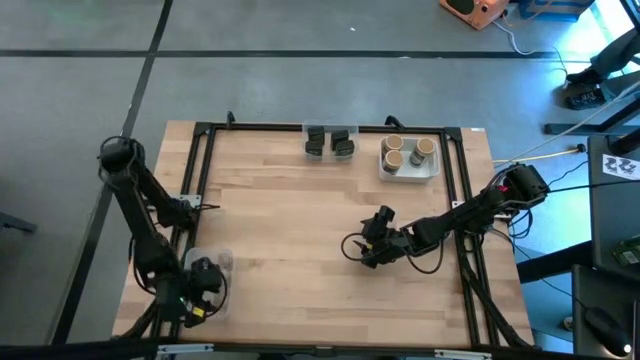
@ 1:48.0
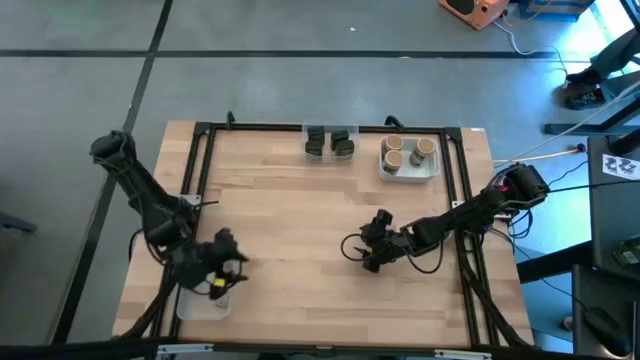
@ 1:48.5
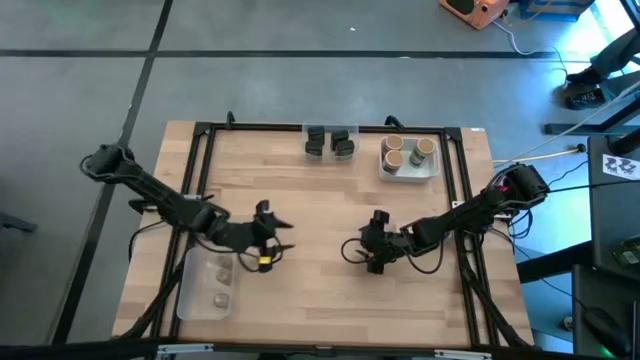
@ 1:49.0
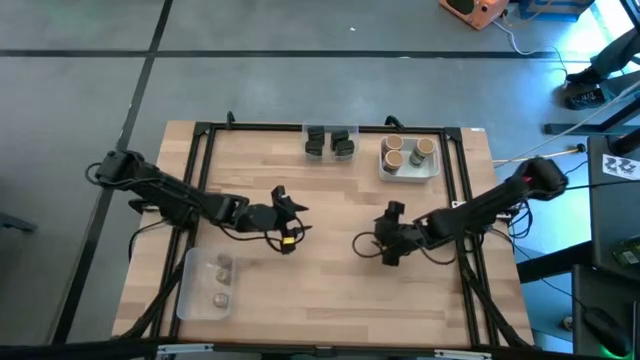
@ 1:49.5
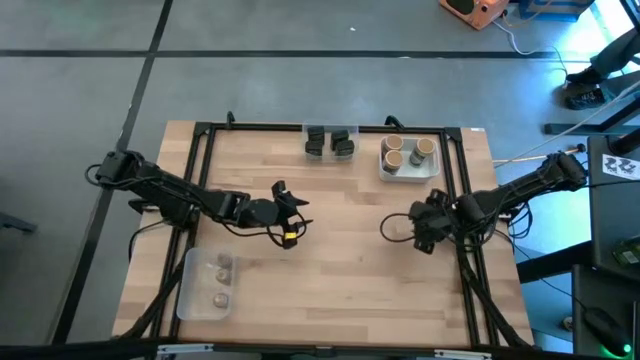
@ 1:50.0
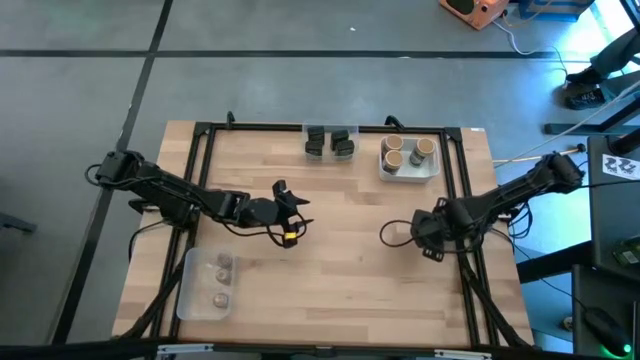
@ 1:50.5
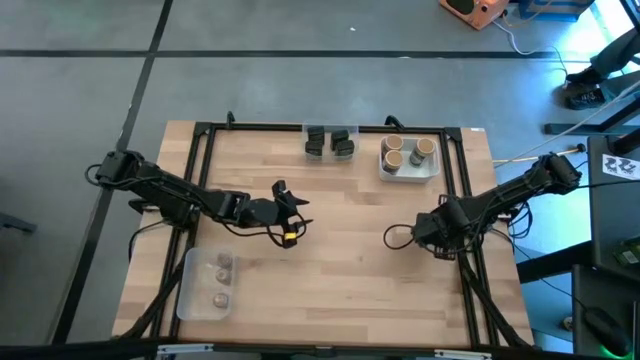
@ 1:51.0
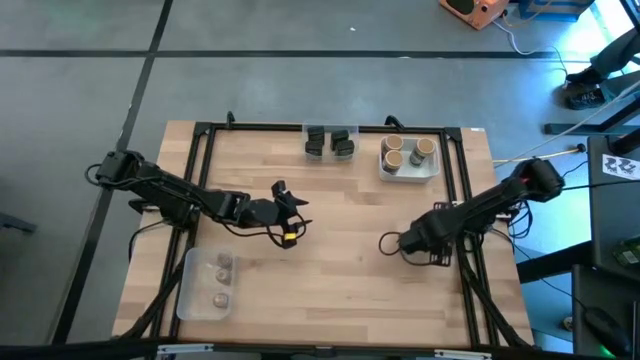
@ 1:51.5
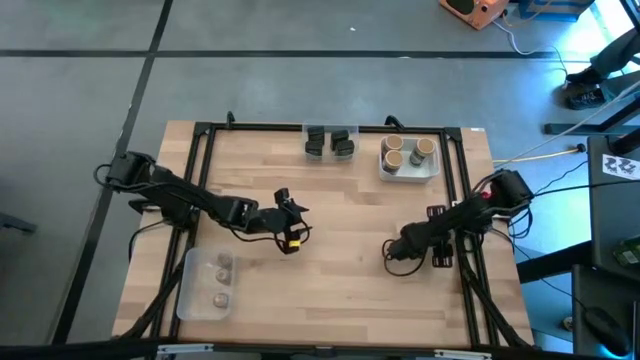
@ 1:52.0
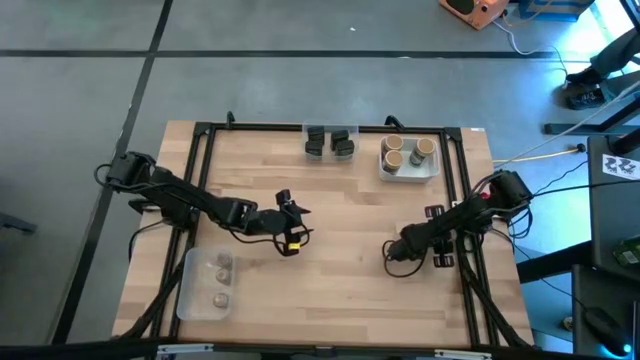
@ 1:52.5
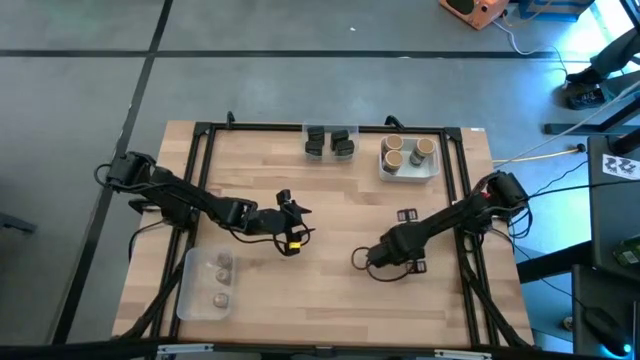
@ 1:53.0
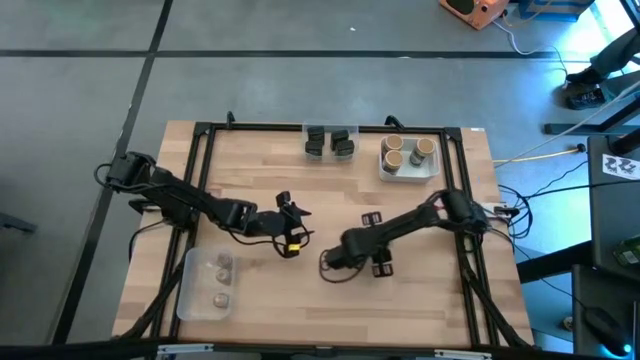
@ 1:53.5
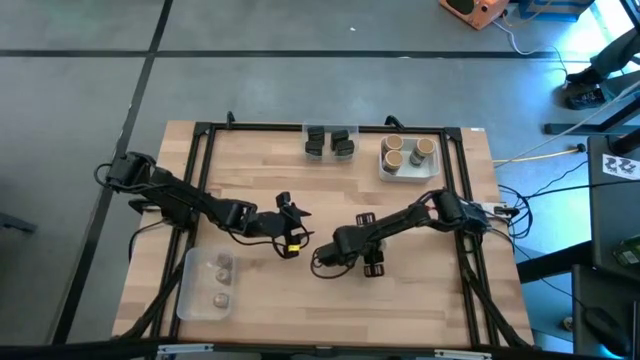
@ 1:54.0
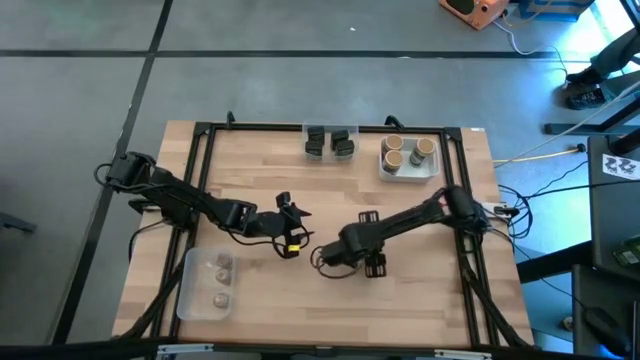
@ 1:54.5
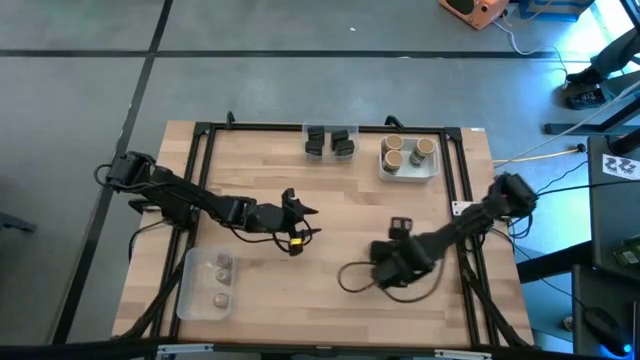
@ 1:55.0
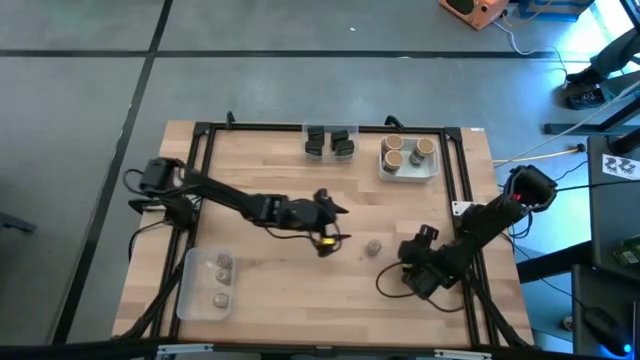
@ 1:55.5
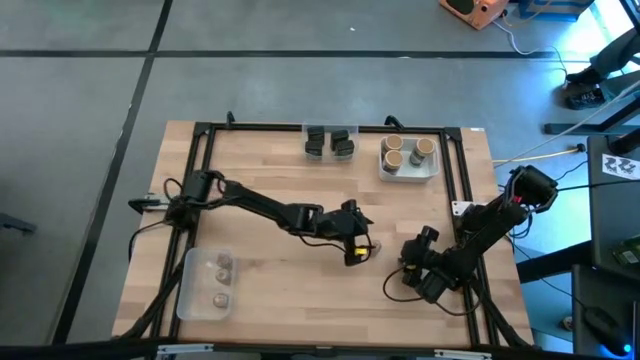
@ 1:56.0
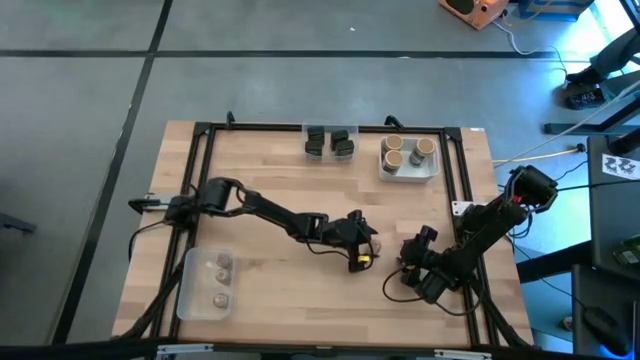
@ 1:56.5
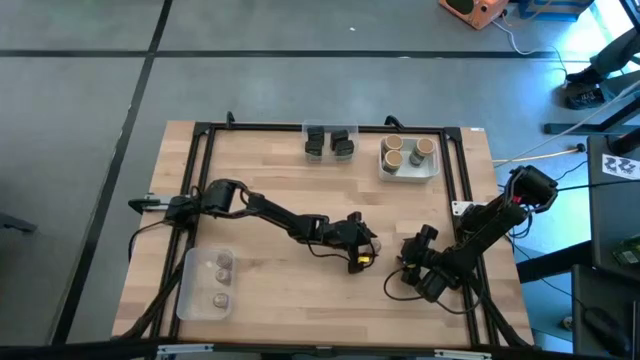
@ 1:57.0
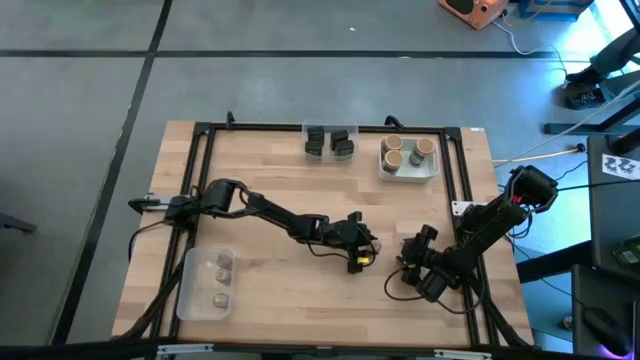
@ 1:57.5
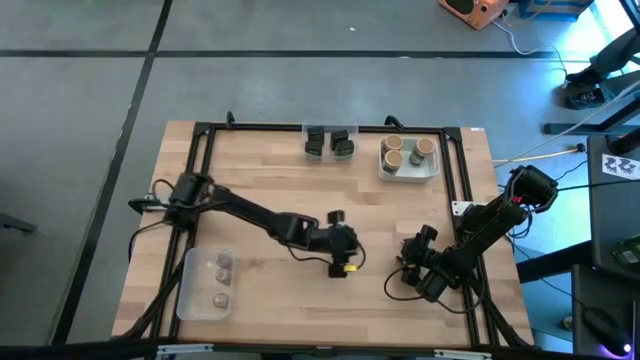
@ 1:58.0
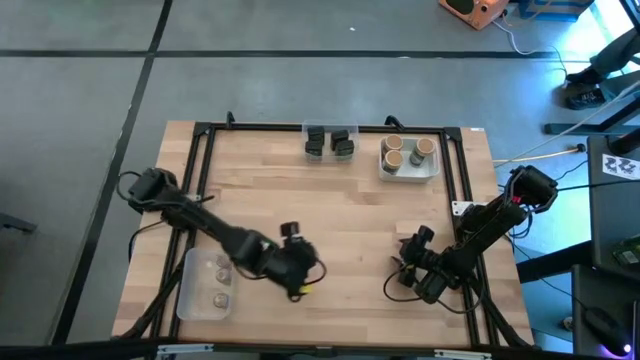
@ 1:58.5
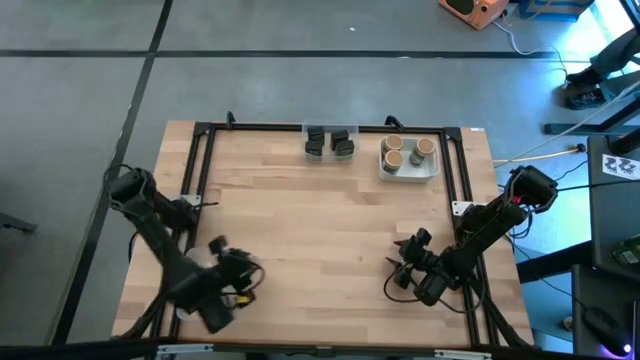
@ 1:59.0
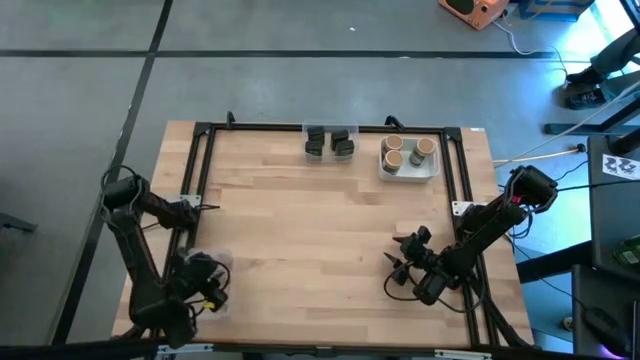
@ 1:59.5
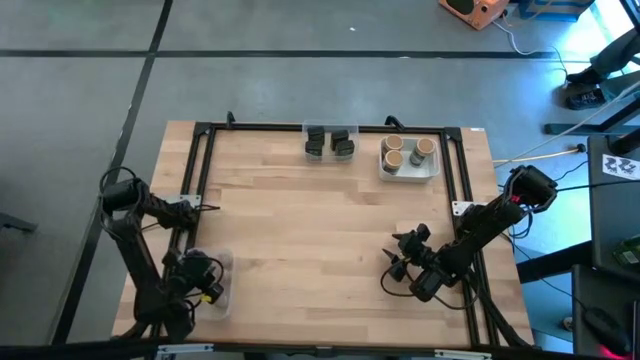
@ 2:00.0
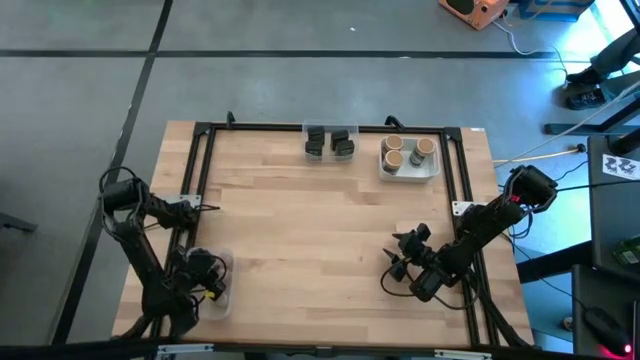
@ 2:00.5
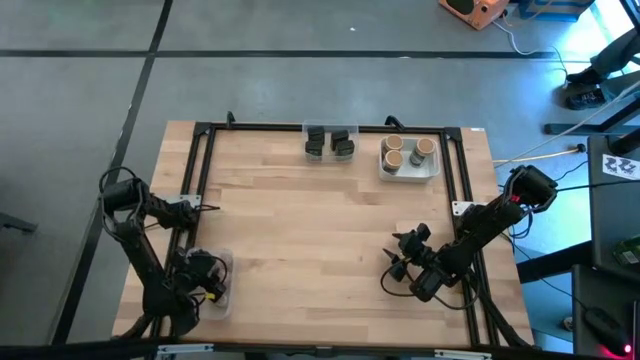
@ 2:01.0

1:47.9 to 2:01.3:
Task: Sort spices by type
Put the transparent seasoning bottle into the left transparent bin

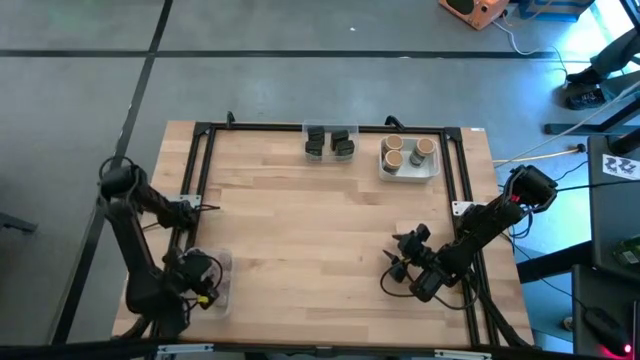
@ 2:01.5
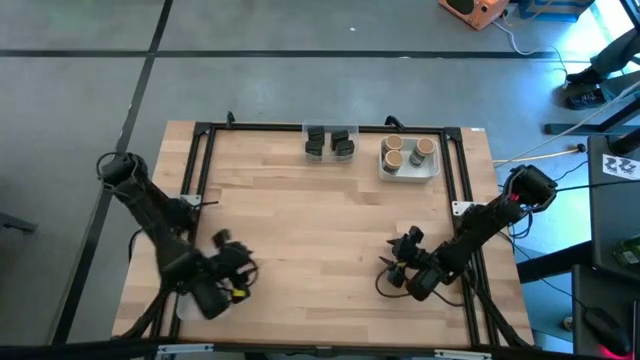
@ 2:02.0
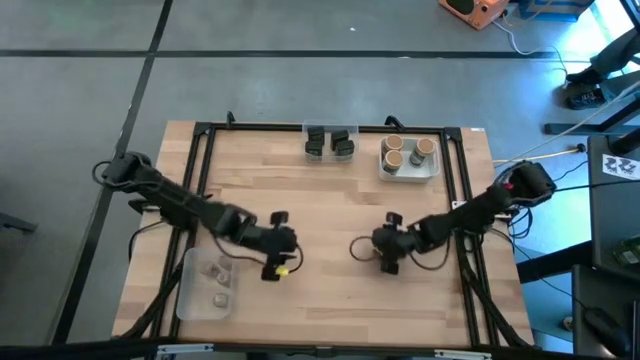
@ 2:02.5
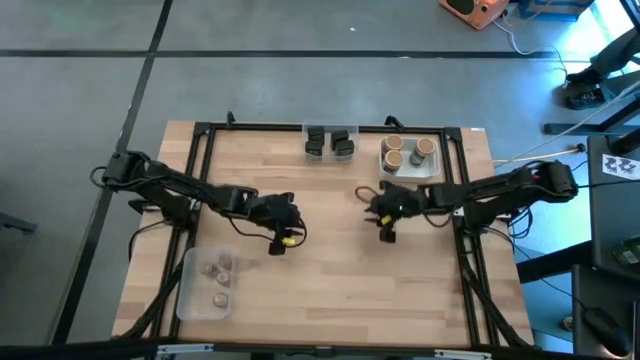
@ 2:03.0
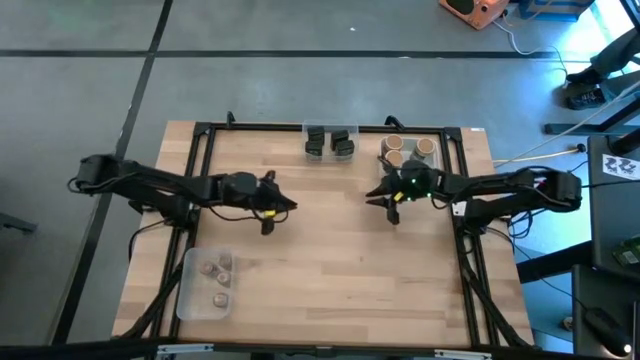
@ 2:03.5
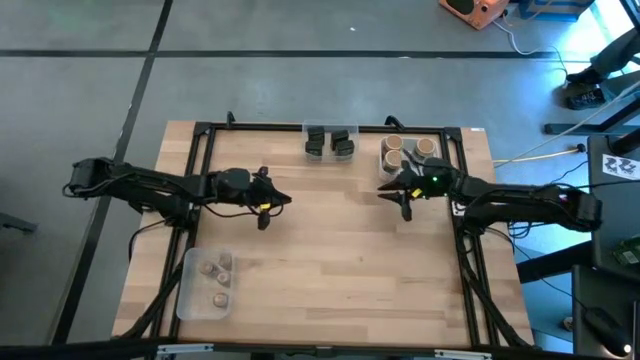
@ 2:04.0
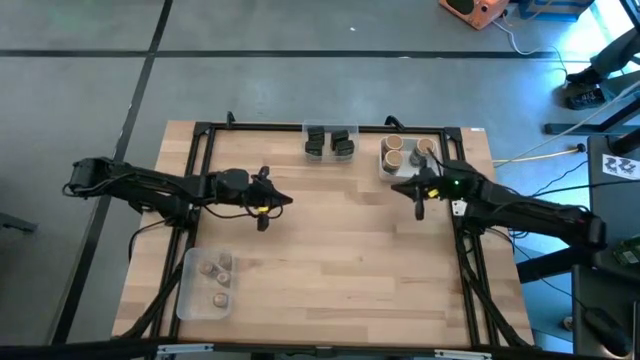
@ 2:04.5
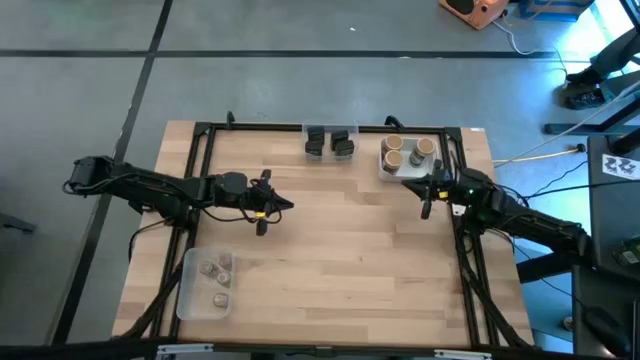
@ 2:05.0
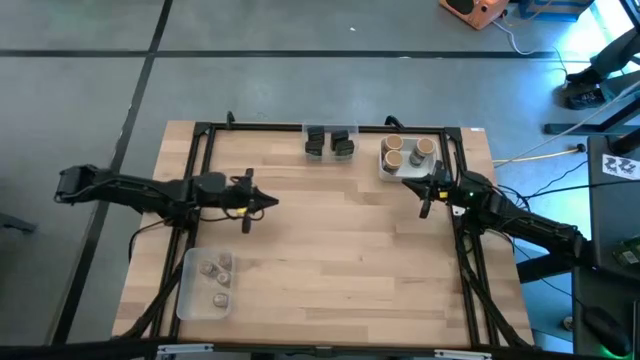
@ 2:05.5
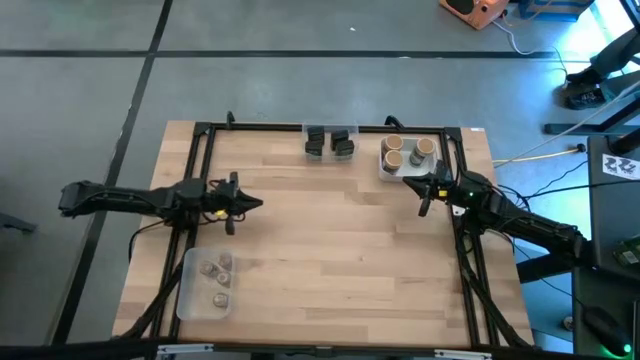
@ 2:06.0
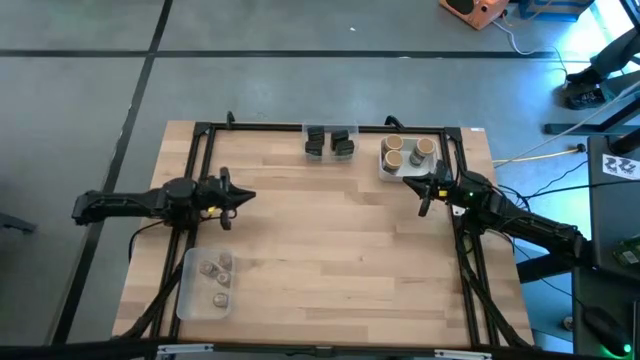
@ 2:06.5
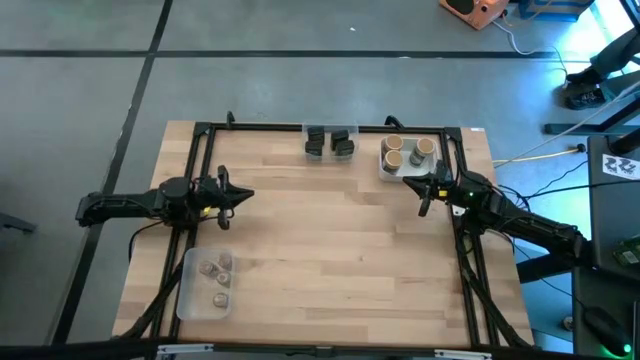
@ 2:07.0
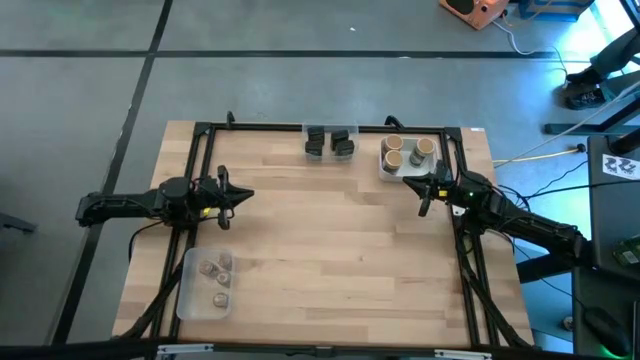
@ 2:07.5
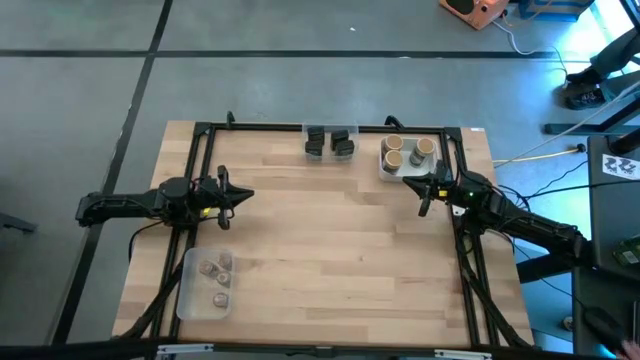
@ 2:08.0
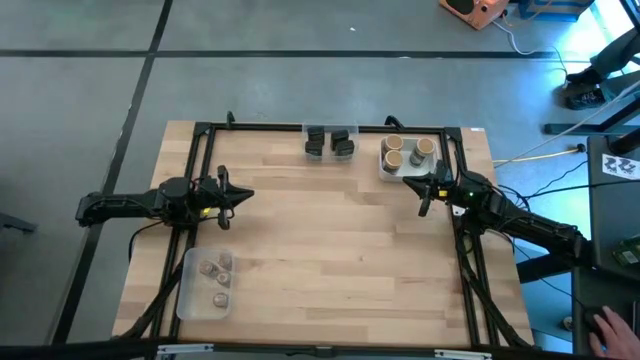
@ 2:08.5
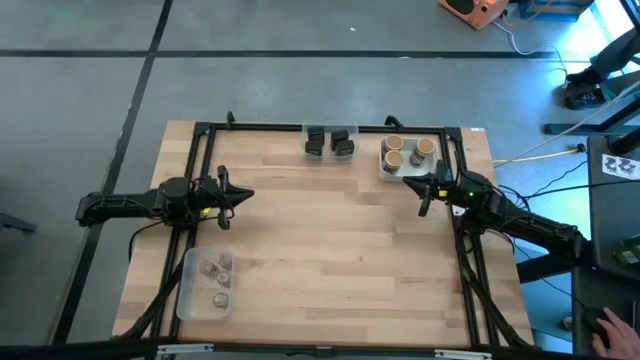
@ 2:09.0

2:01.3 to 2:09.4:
Return to Home position
